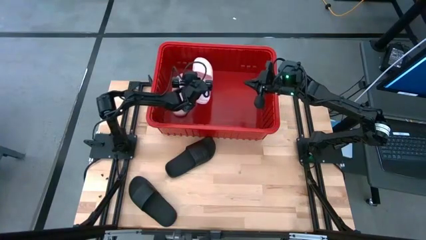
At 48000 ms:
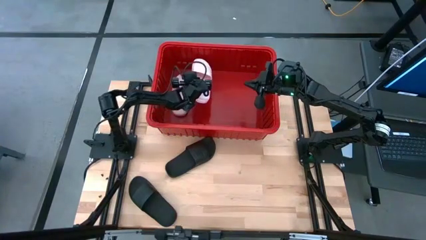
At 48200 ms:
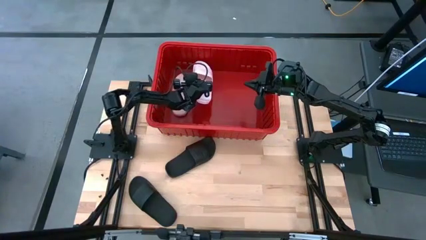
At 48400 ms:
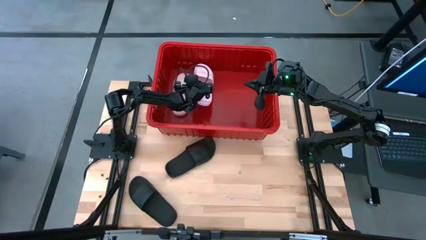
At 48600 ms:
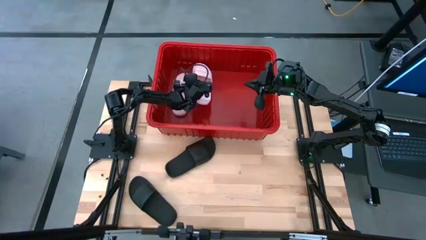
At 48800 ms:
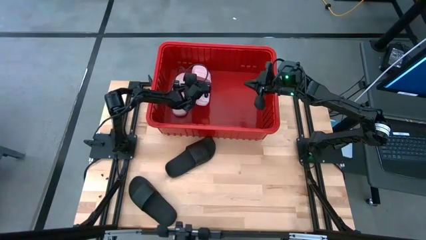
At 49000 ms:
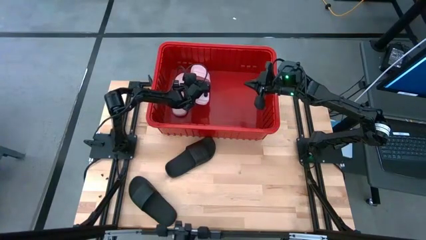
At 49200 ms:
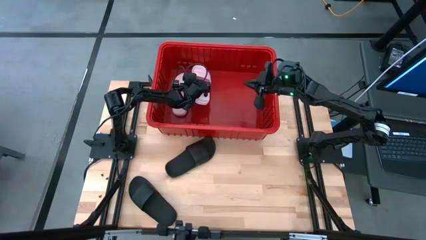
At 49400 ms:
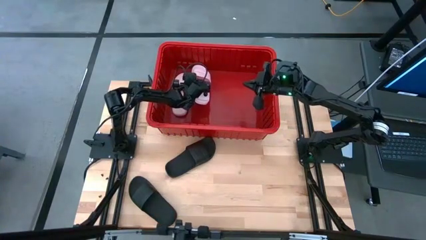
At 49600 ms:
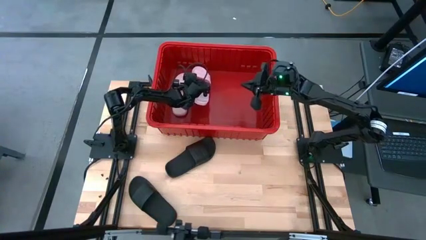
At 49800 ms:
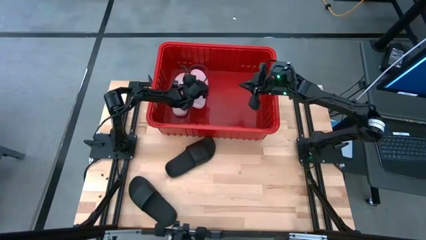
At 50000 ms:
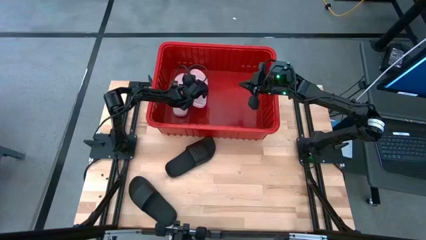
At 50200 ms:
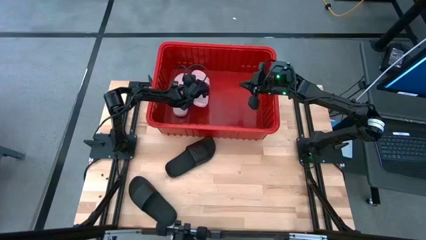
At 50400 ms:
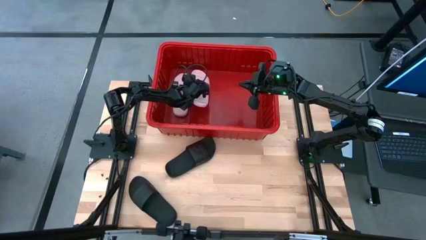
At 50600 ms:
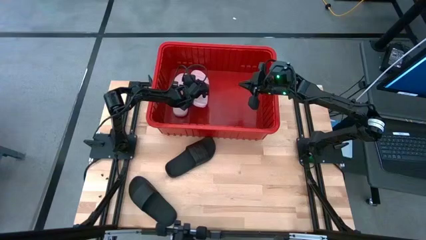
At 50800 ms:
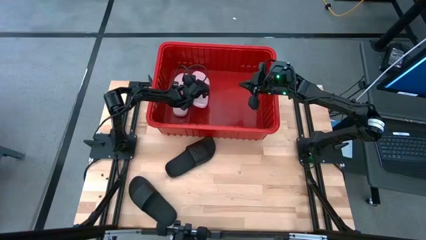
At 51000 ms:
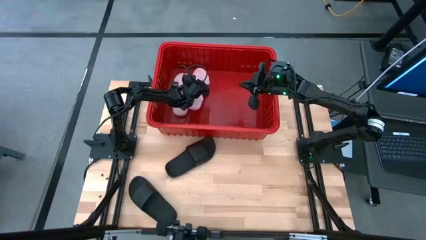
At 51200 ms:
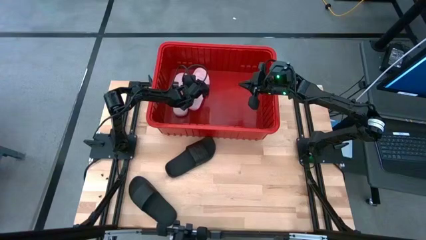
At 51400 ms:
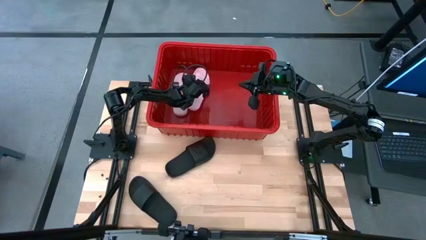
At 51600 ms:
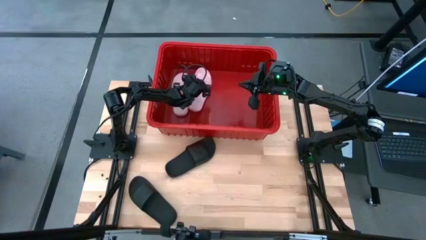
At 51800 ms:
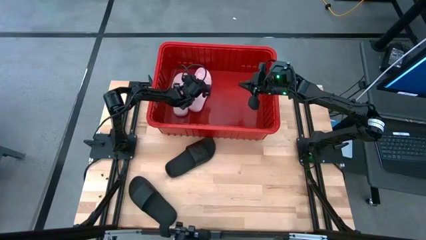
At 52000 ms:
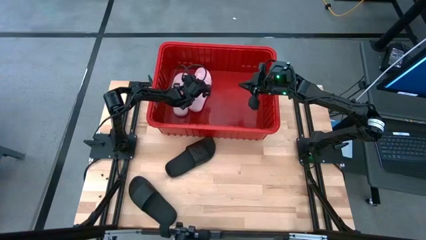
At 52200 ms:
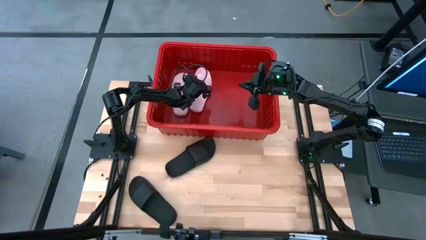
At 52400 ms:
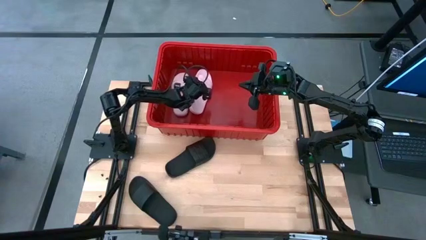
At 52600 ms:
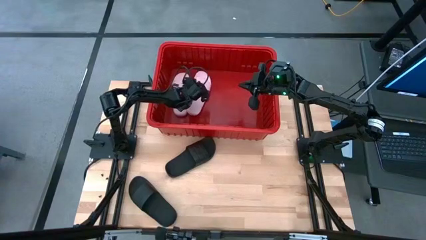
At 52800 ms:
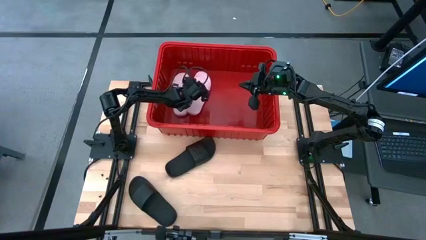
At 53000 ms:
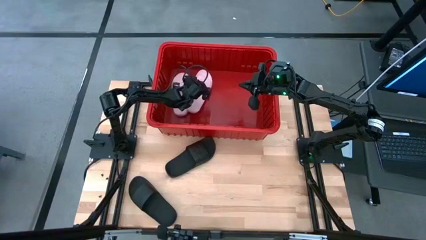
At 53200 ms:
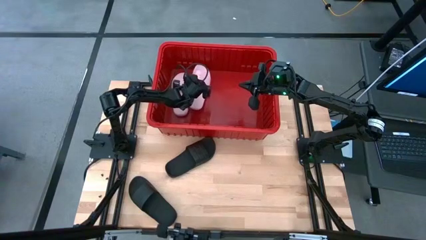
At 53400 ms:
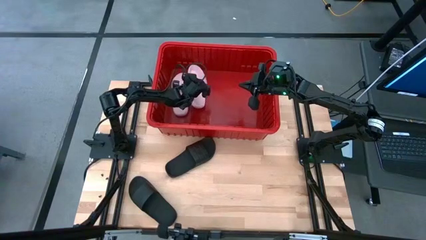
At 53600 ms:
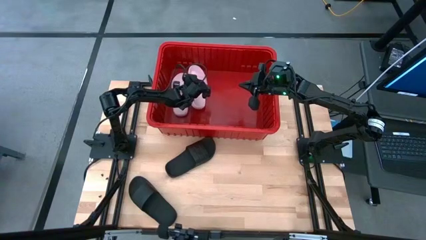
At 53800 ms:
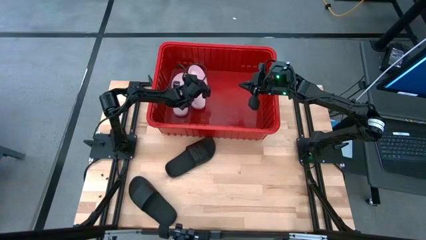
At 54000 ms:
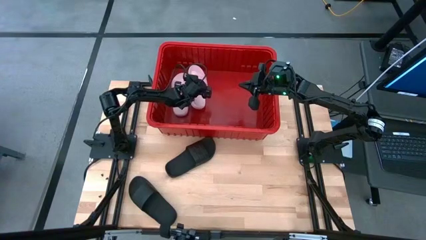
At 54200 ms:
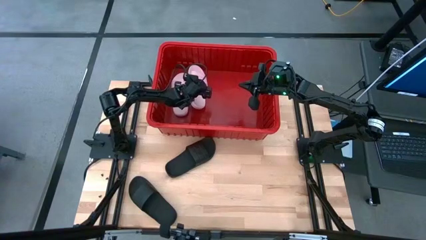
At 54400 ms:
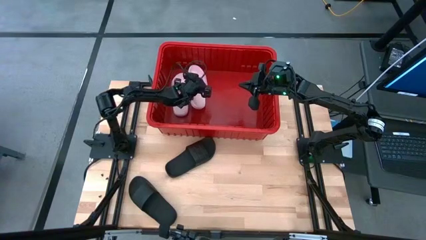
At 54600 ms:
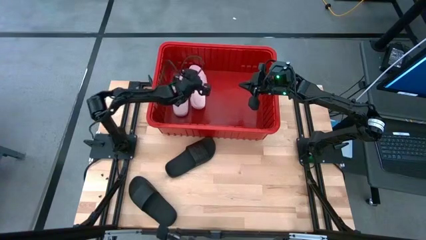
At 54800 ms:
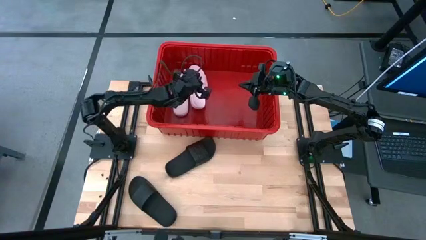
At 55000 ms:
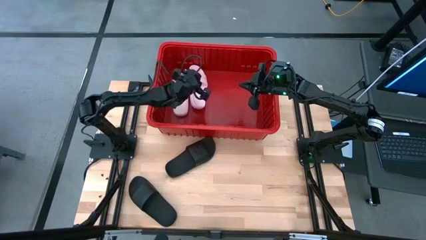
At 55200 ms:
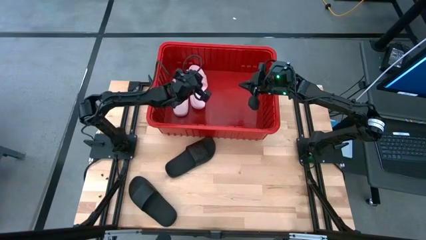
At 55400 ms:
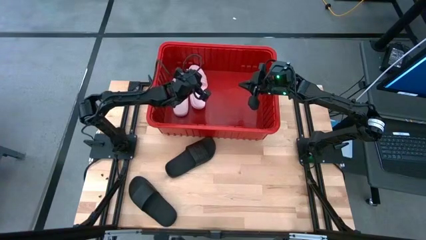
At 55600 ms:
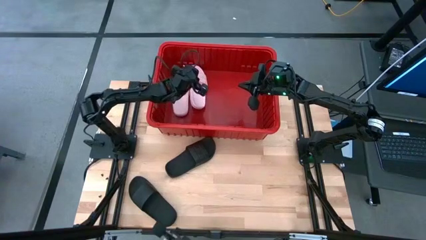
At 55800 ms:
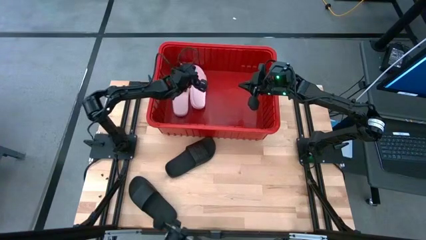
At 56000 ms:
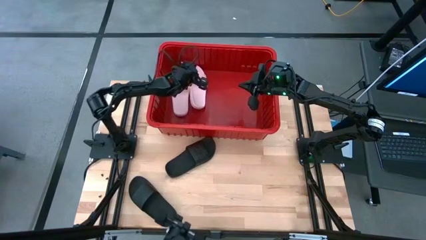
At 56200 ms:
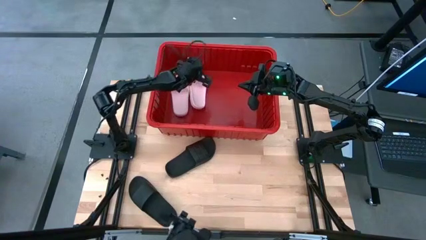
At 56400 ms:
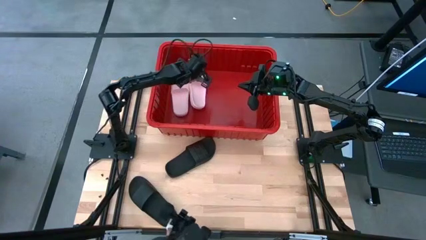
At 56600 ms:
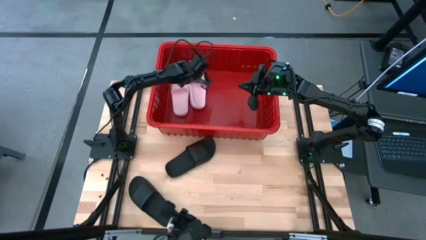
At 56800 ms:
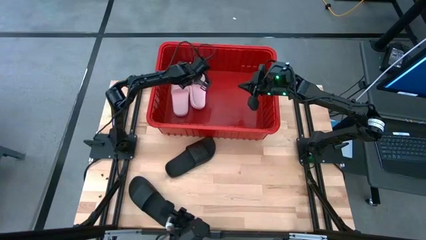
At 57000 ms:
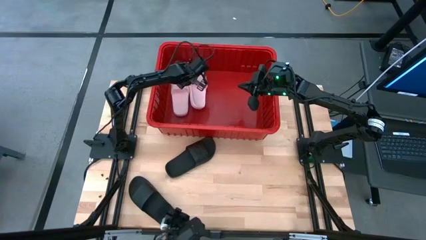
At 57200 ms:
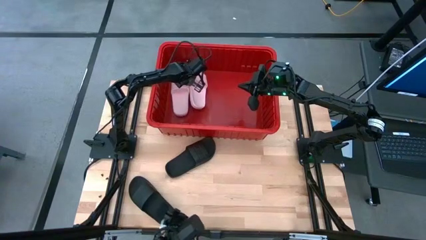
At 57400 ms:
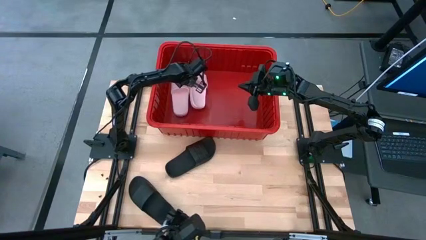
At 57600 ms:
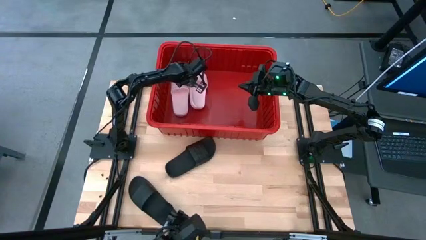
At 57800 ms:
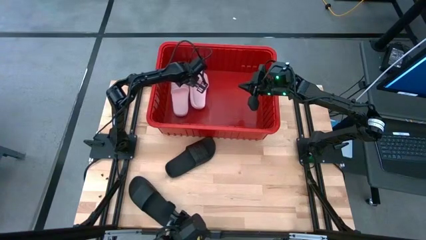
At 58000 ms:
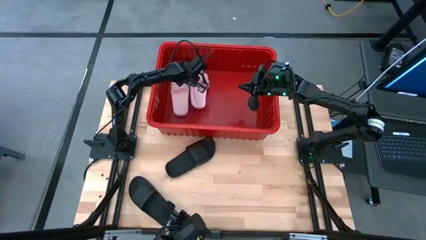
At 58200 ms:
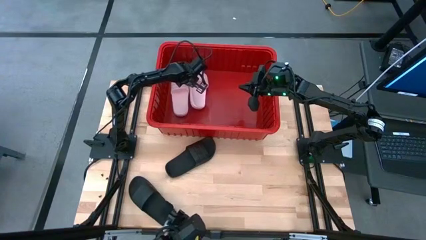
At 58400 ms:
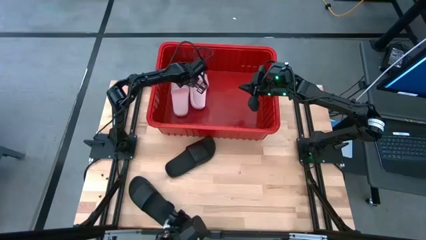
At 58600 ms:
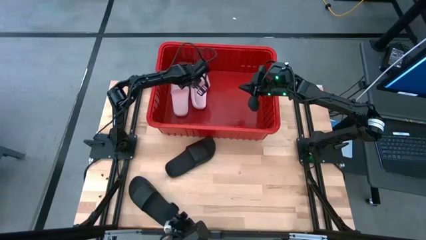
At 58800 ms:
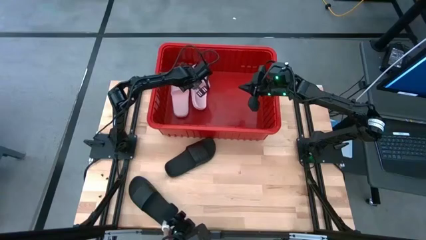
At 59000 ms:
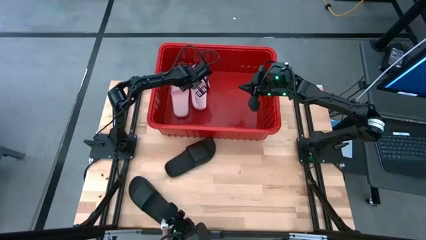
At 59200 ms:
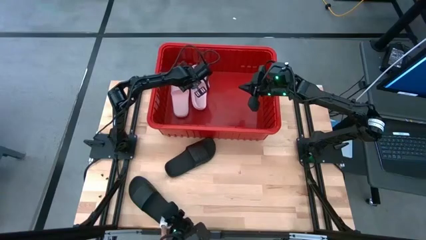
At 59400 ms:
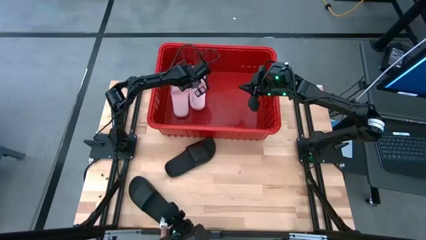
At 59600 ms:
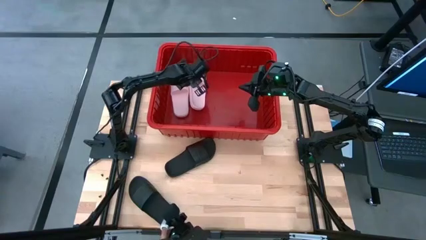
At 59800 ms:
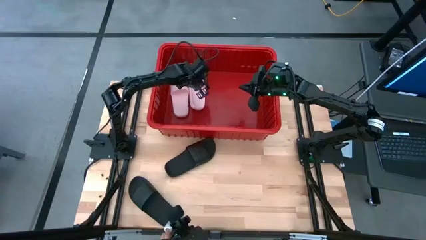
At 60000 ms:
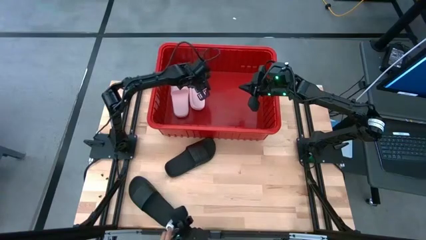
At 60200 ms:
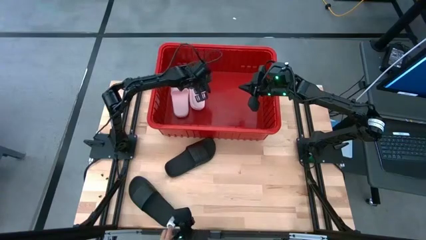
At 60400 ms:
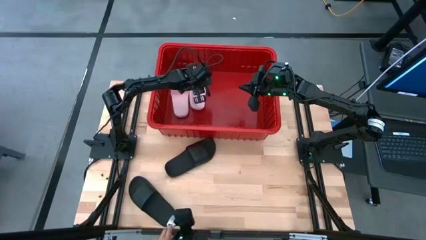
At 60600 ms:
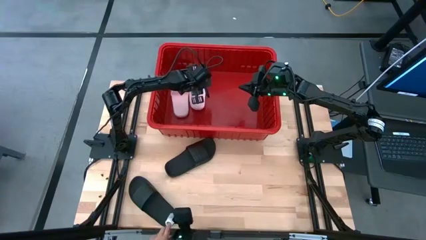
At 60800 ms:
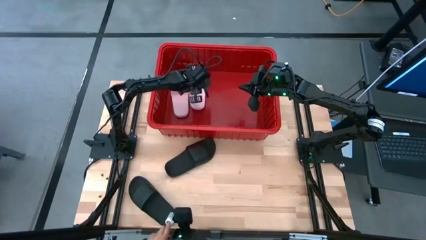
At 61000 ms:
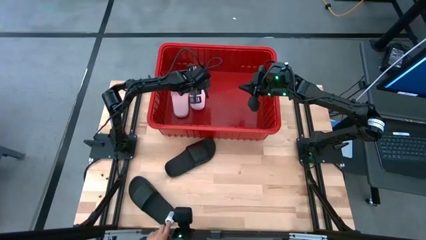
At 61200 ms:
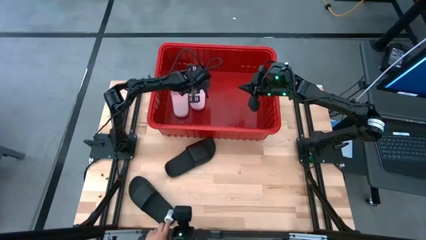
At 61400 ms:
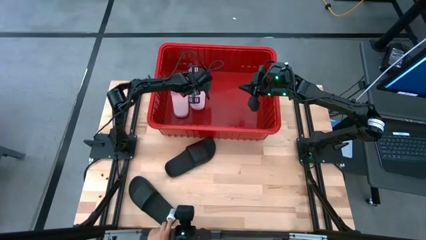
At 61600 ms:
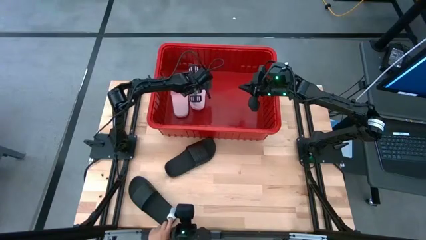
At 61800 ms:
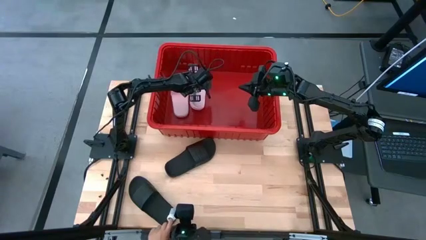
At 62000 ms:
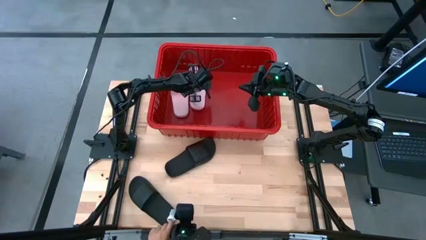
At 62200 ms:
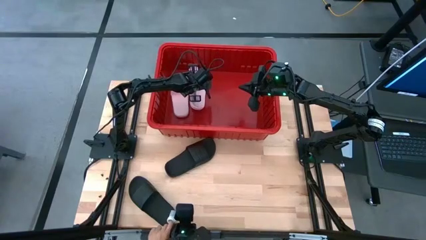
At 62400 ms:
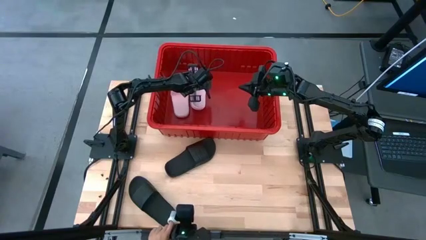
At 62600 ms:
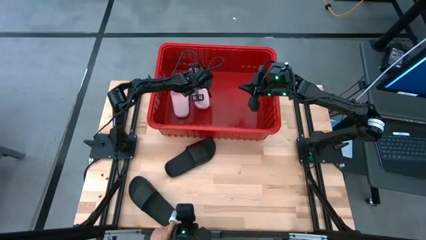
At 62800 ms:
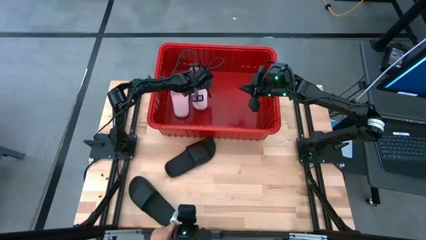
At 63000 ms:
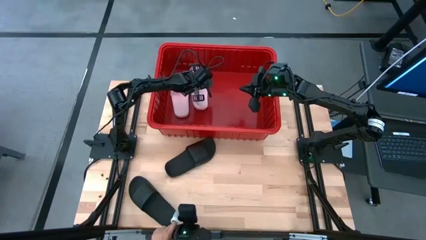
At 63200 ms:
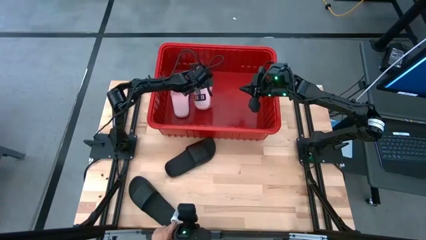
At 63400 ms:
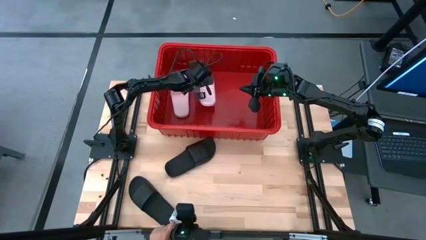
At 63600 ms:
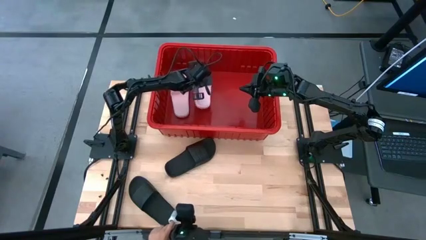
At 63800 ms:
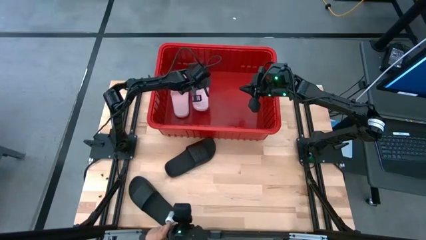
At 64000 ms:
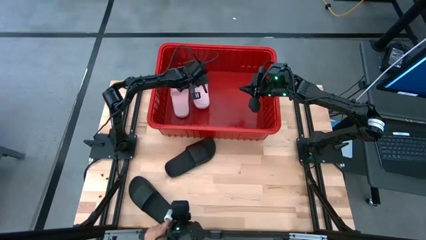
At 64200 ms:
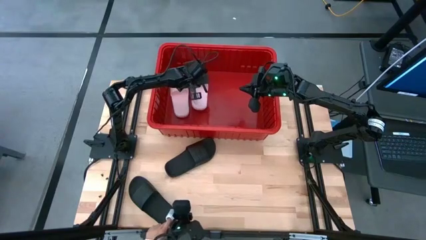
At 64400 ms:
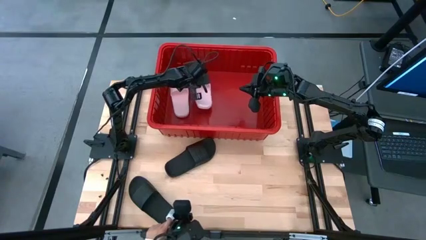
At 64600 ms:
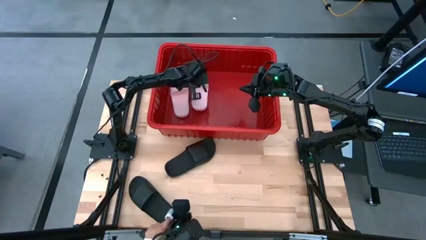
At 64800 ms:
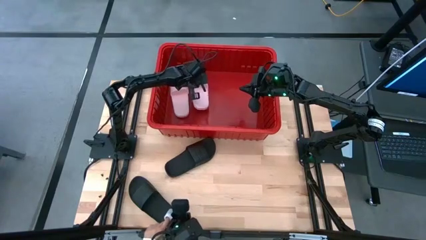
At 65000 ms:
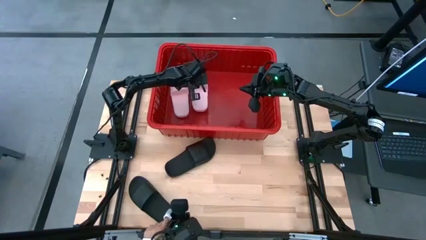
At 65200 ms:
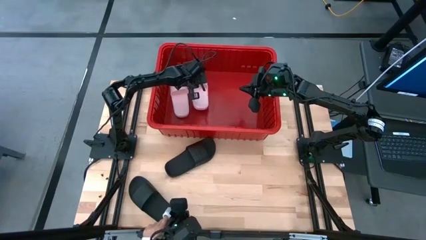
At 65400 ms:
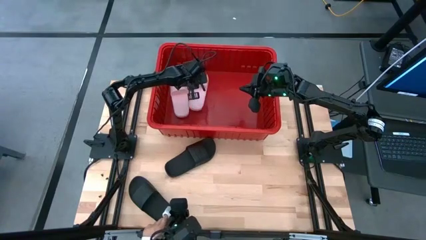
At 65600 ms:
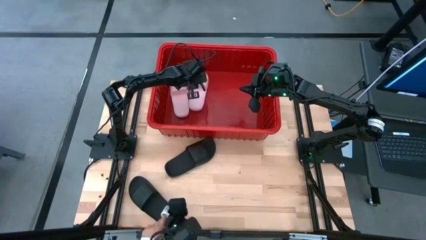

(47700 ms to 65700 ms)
Task: Pick and place slides into bin
Put the pink slide into the red bin
